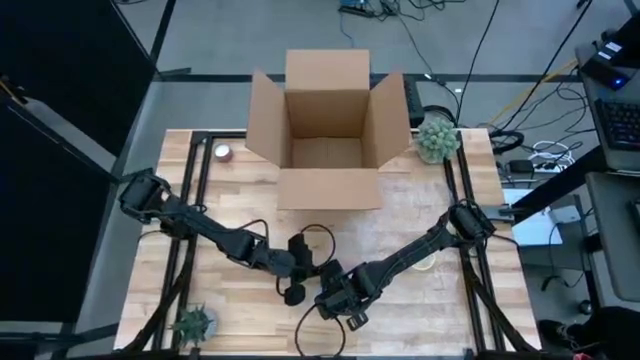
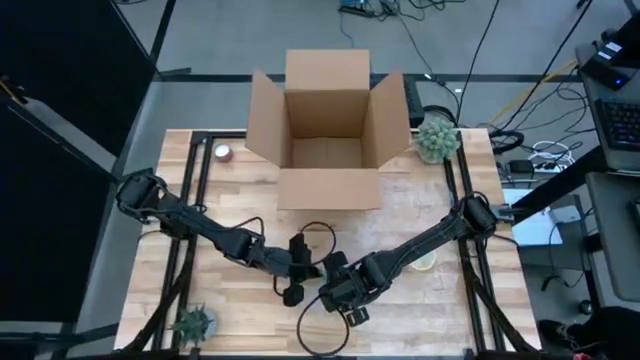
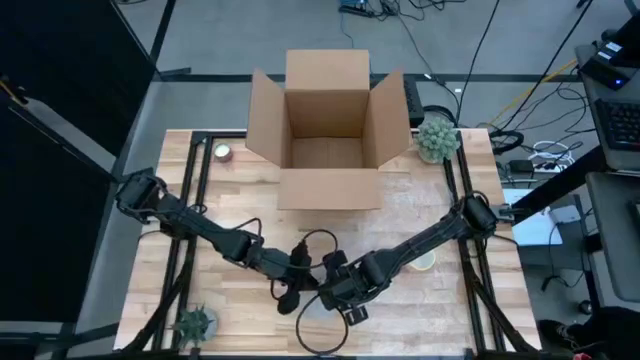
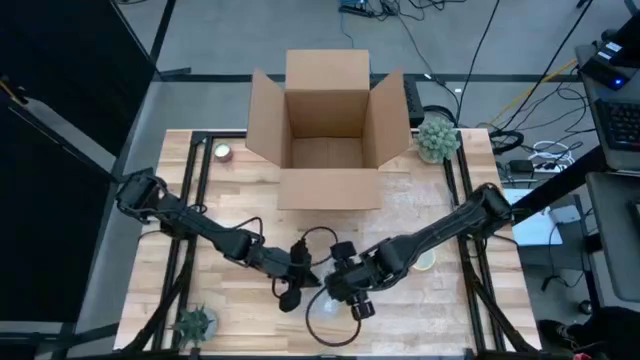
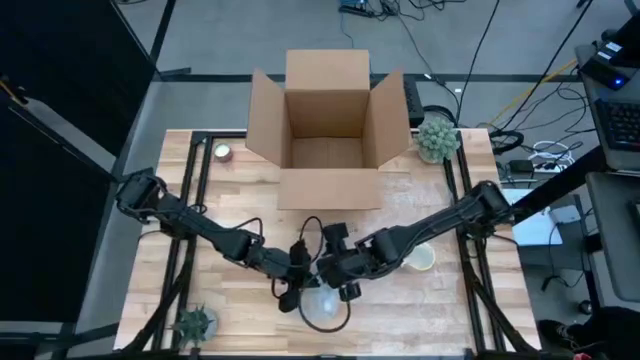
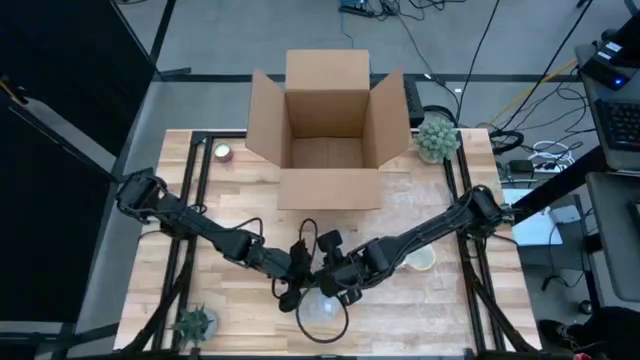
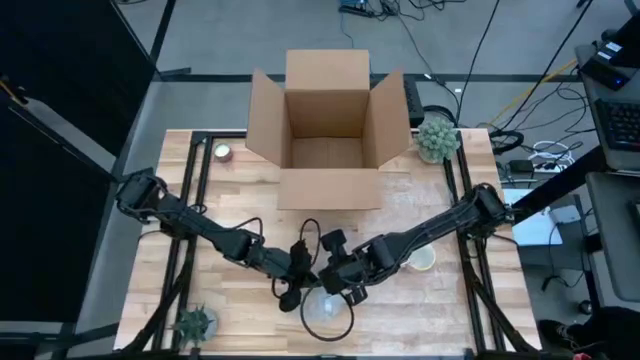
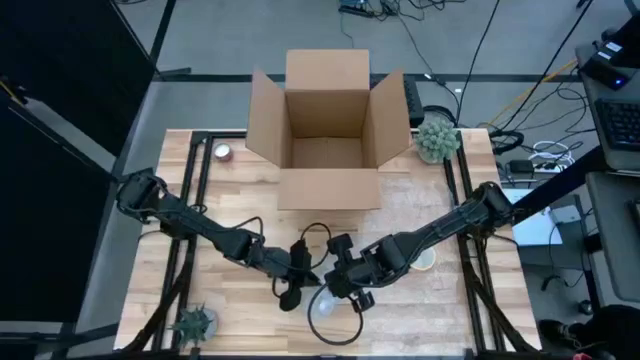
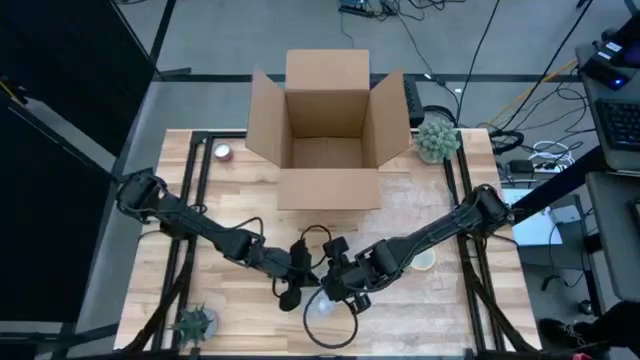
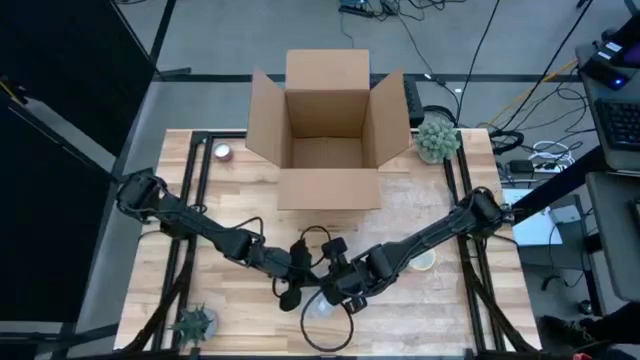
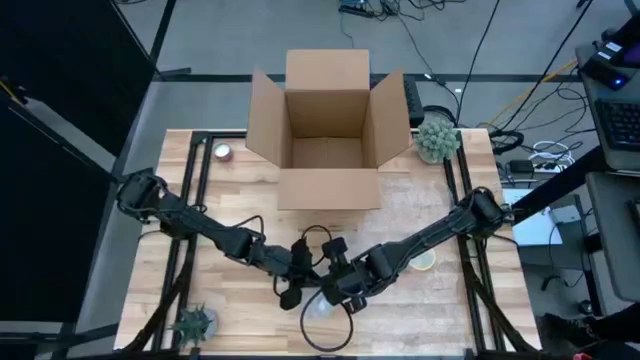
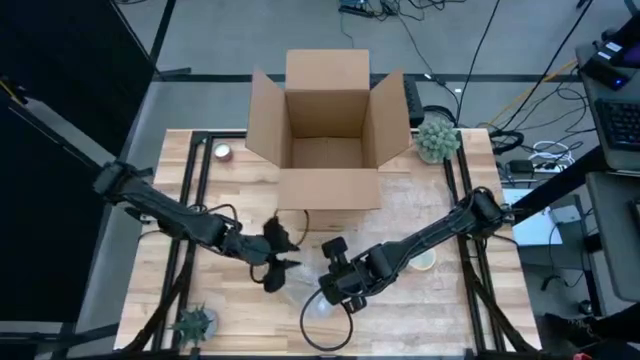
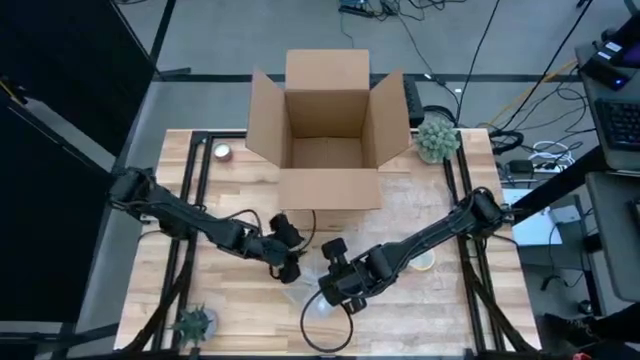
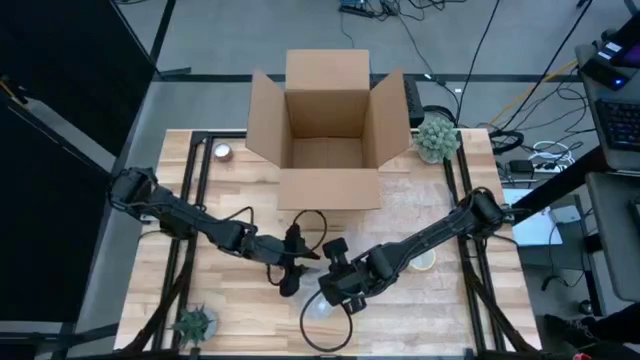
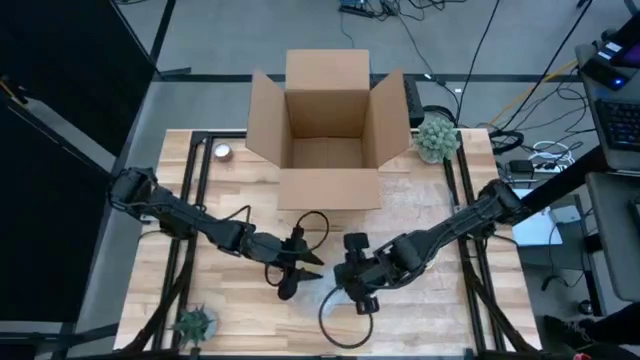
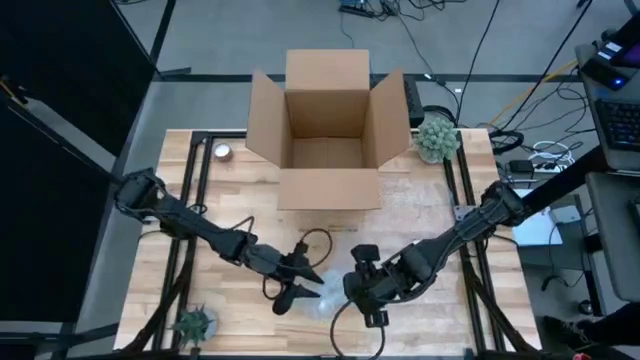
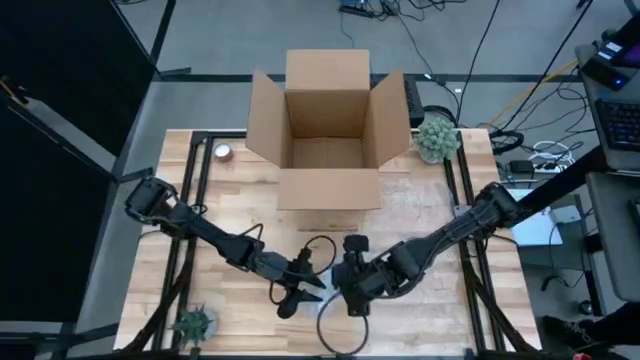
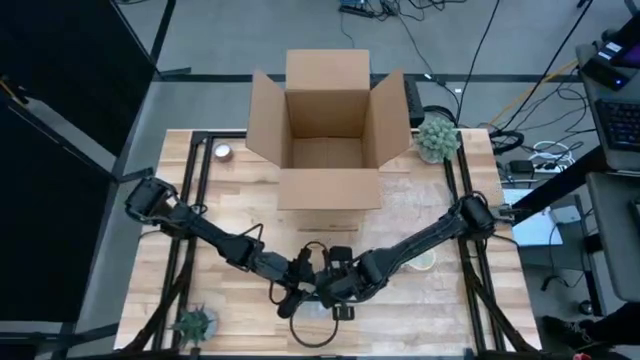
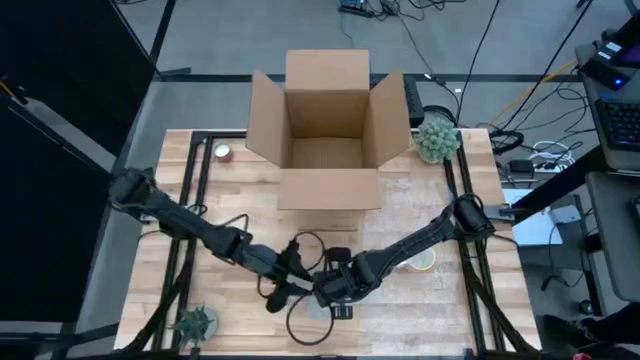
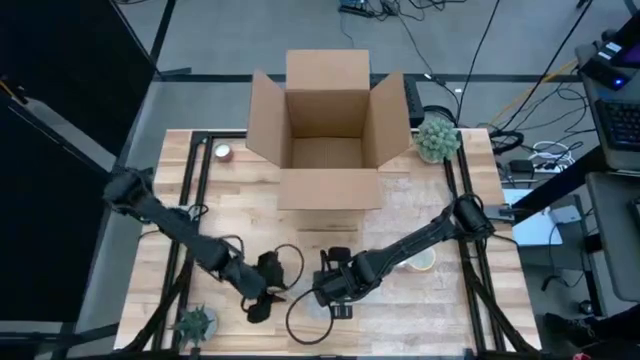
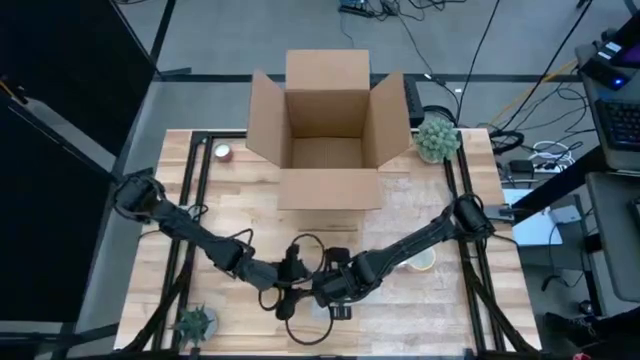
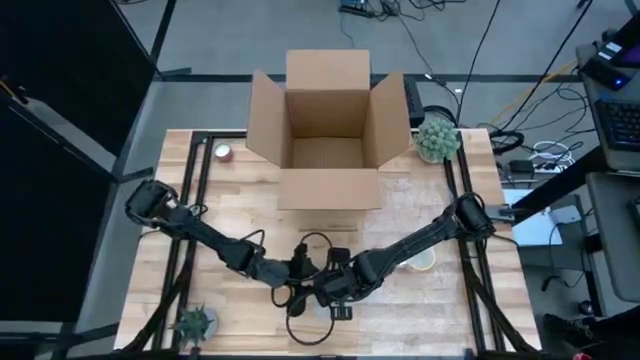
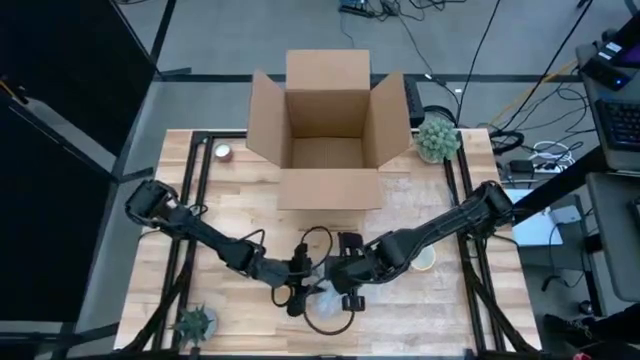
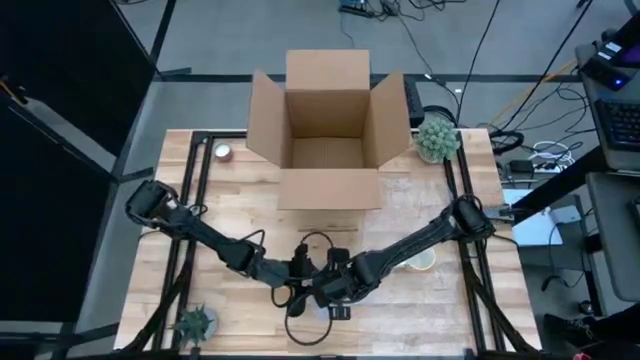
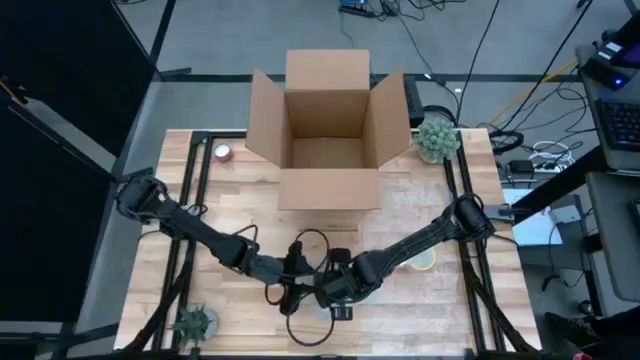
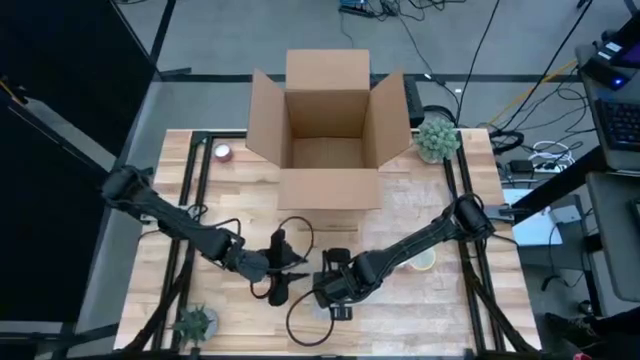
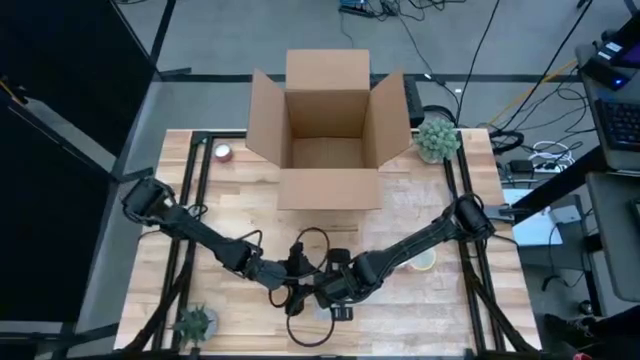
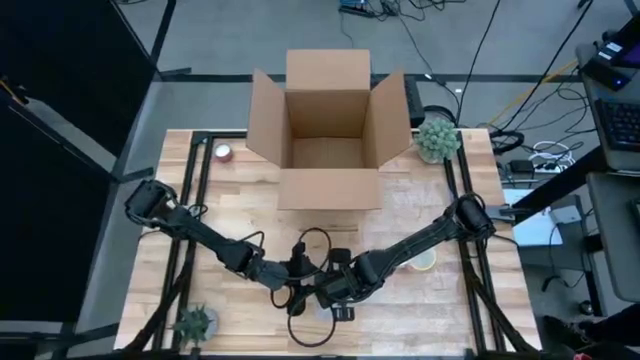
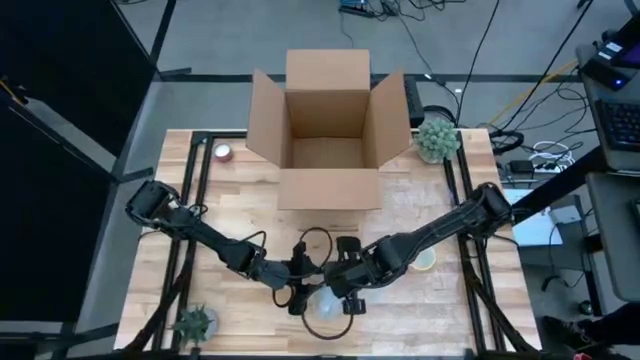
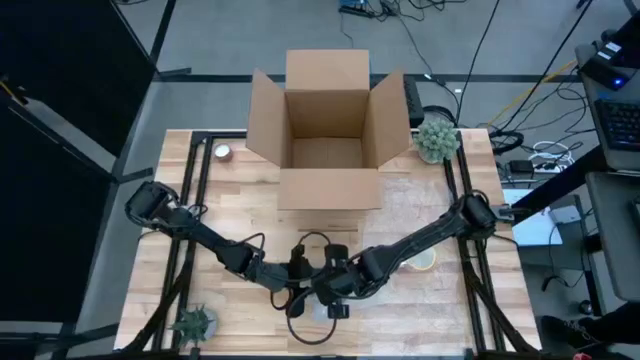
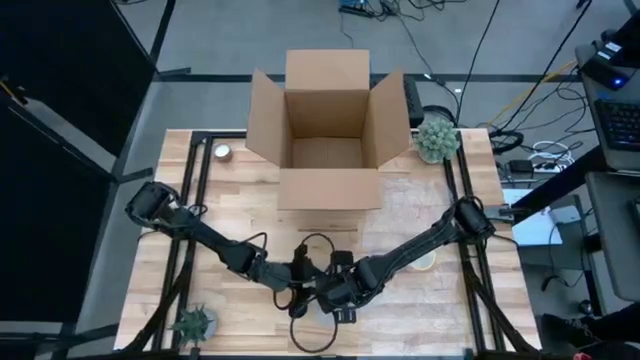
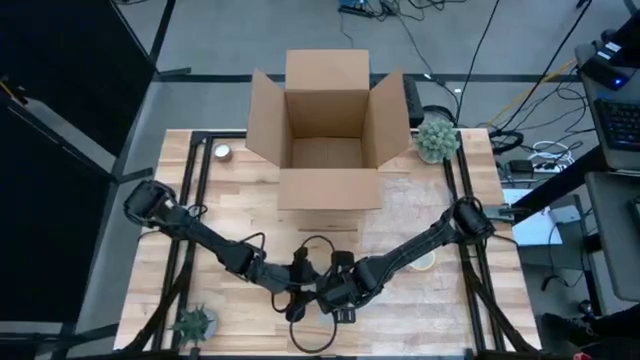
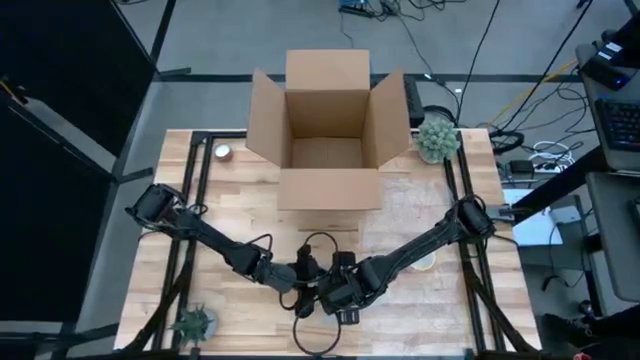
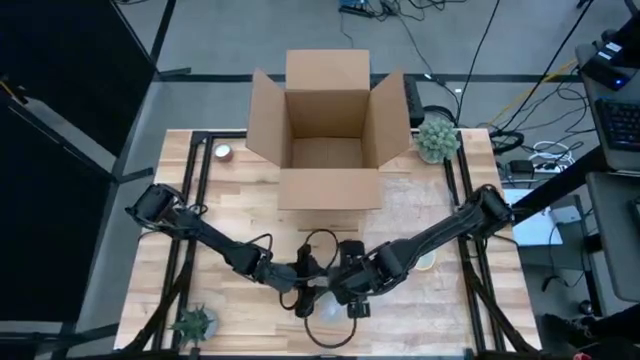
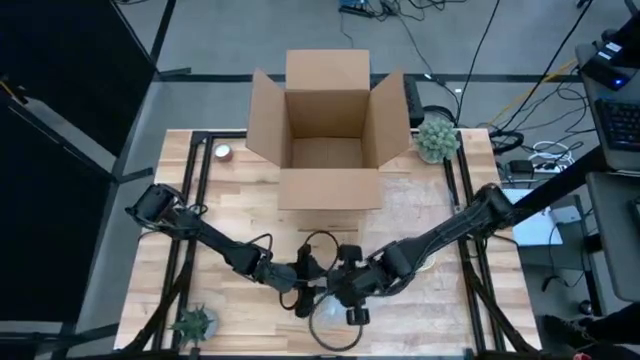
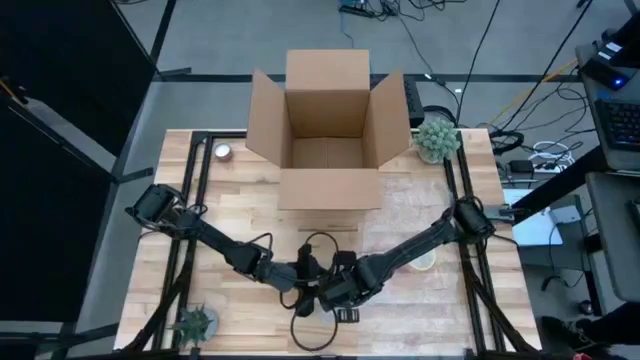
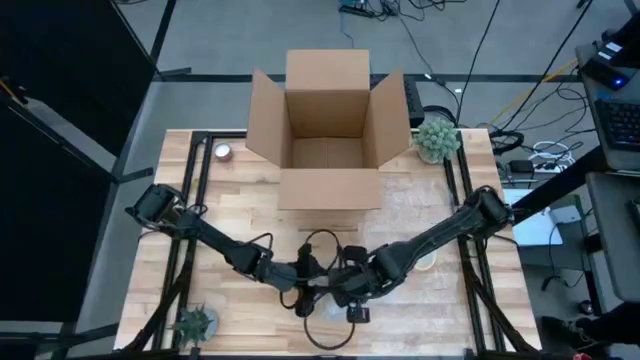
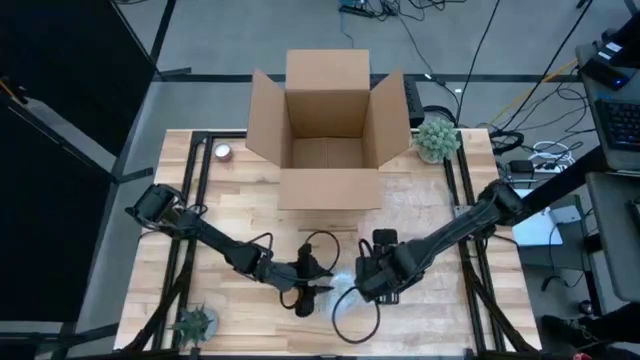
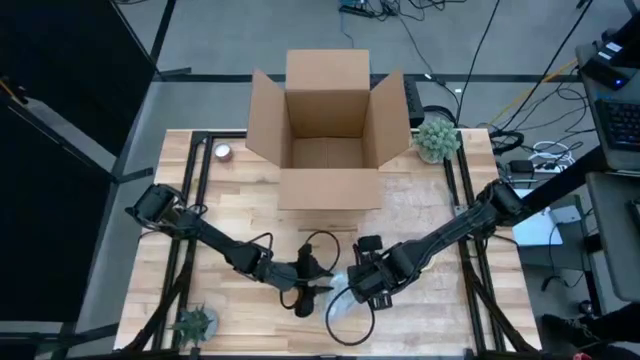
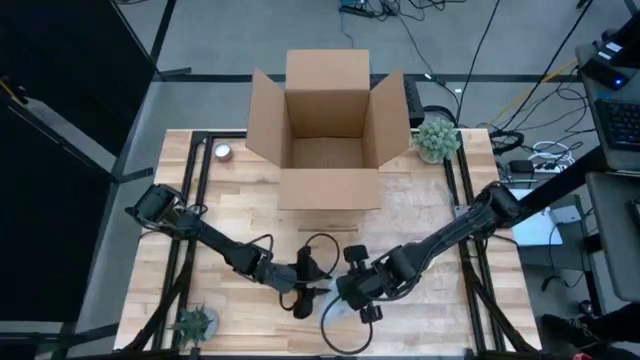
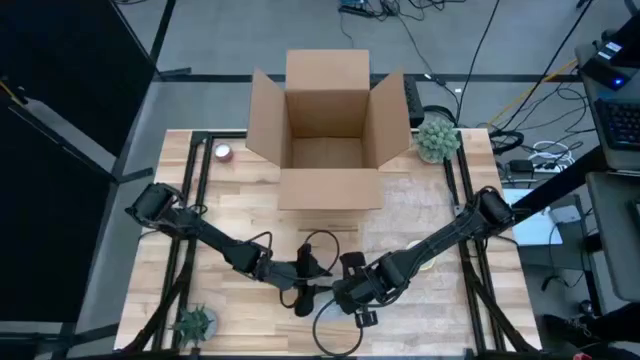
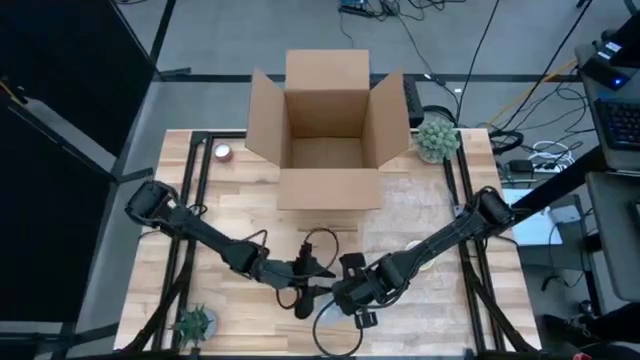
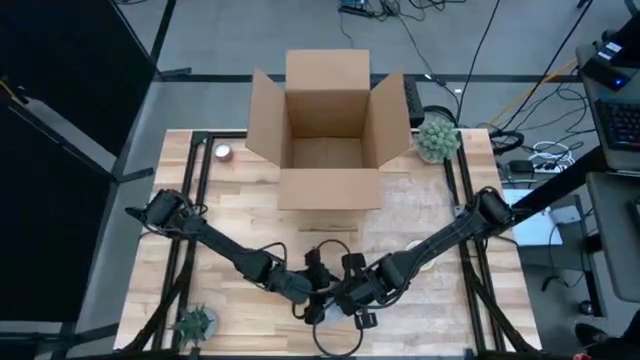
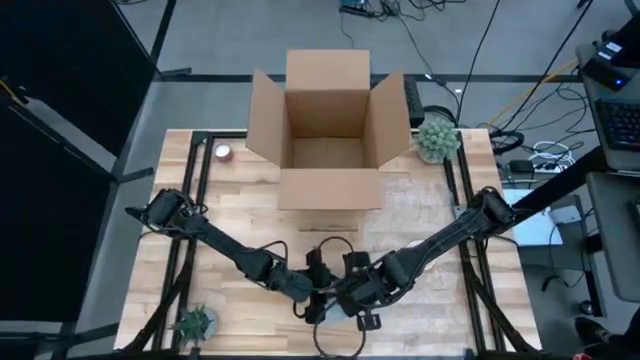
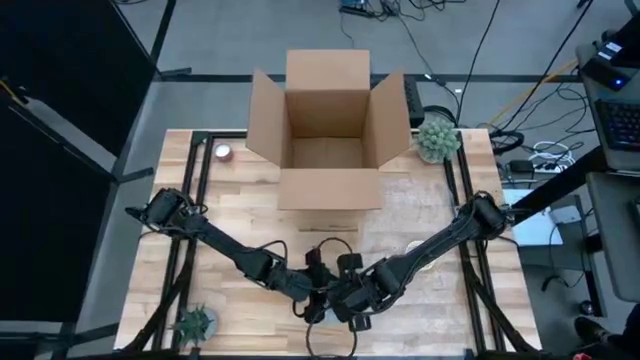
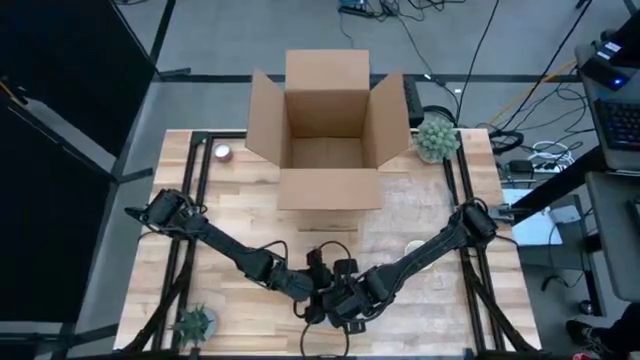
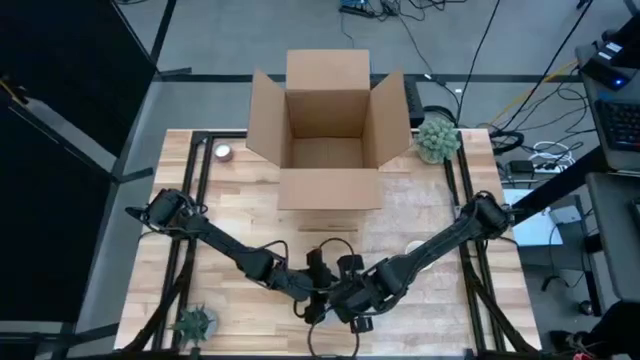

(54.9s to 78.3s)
Task: wrap mug
Wrap the red cup with the left transparent bubble wrap
